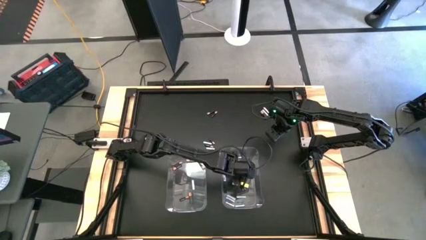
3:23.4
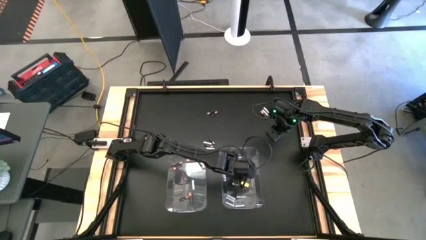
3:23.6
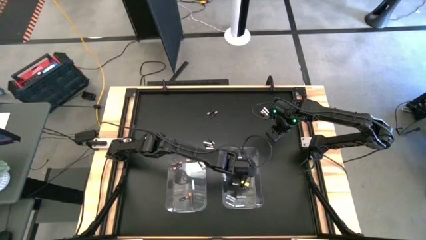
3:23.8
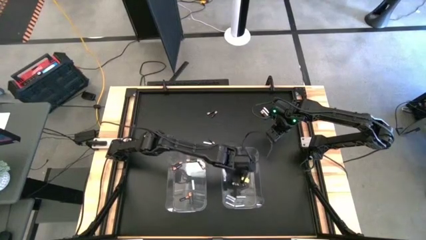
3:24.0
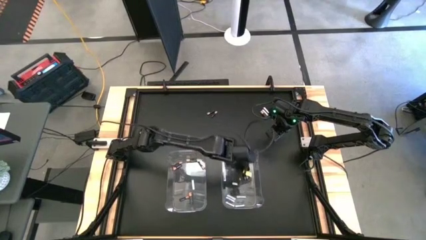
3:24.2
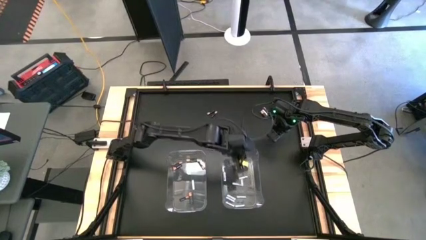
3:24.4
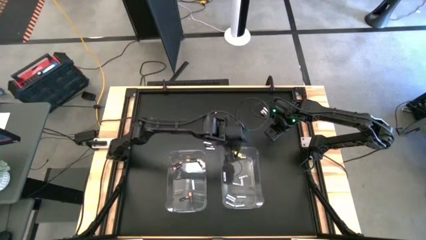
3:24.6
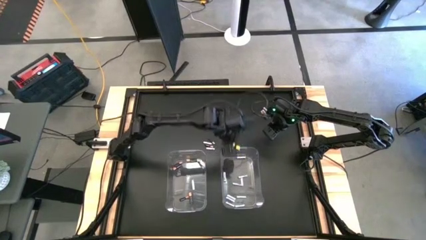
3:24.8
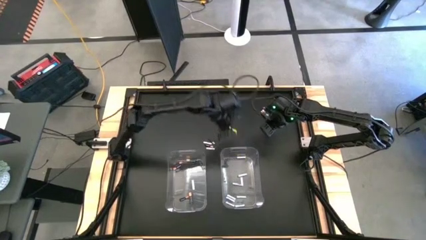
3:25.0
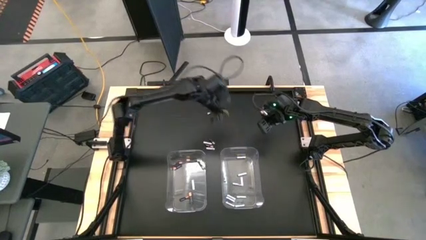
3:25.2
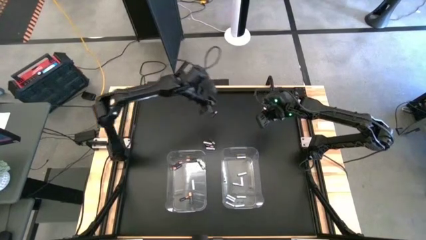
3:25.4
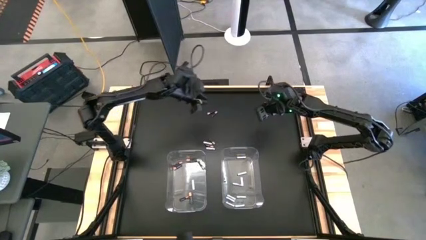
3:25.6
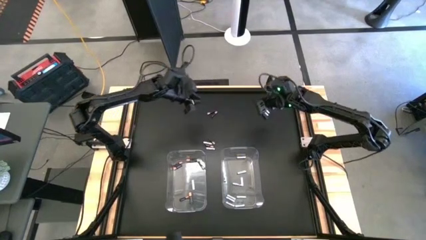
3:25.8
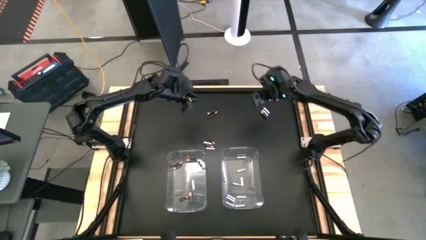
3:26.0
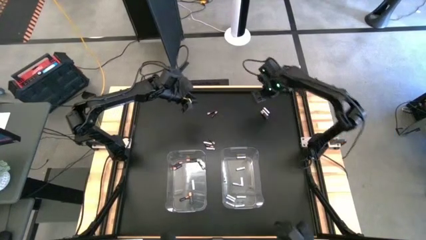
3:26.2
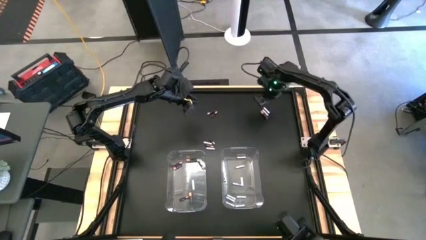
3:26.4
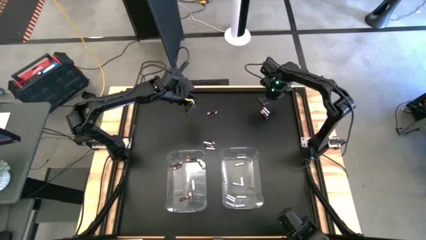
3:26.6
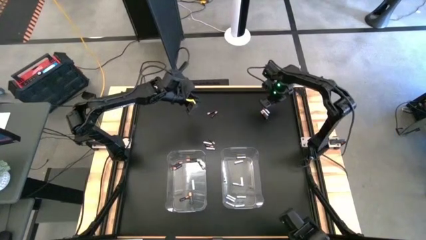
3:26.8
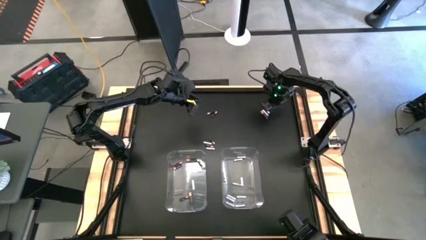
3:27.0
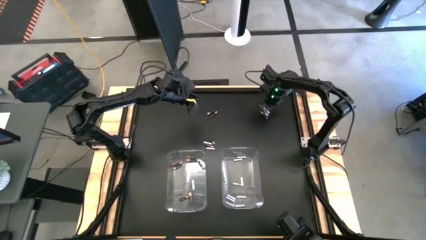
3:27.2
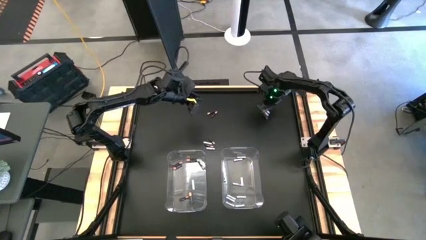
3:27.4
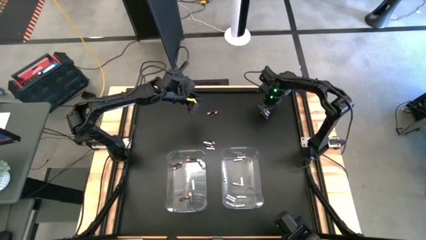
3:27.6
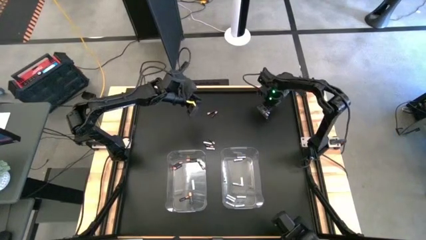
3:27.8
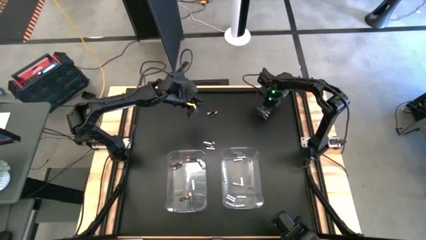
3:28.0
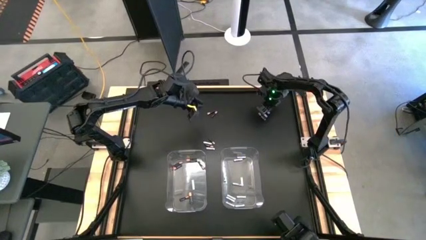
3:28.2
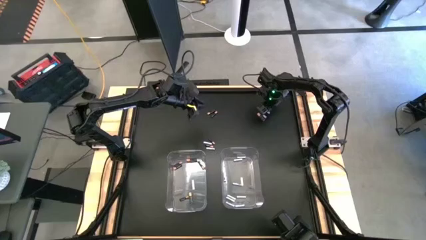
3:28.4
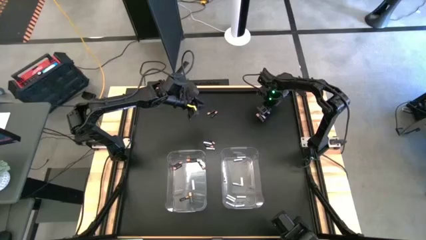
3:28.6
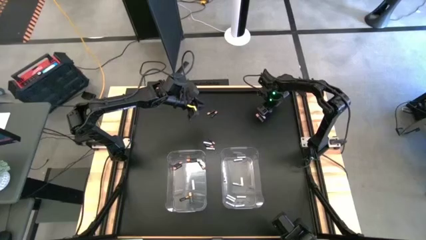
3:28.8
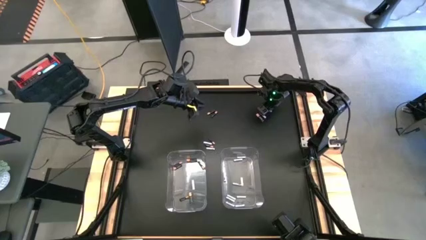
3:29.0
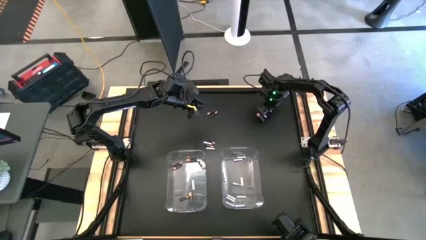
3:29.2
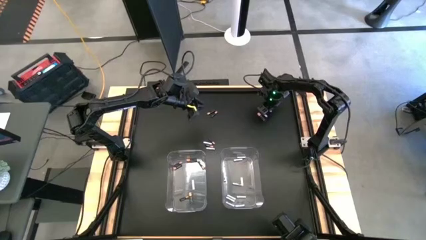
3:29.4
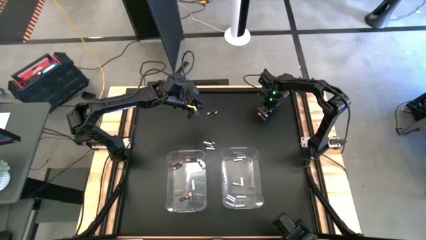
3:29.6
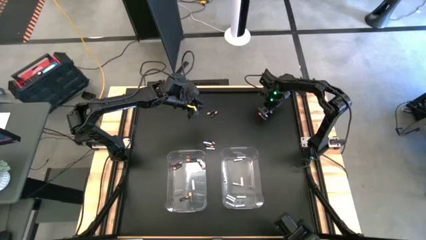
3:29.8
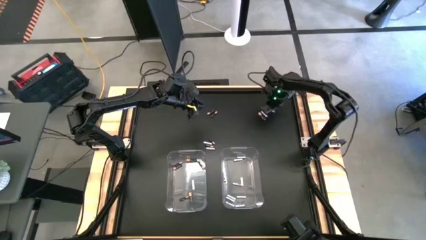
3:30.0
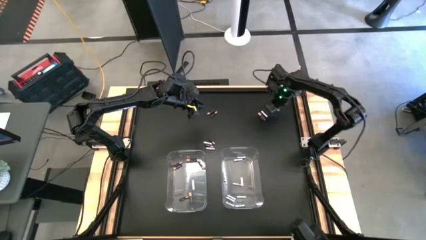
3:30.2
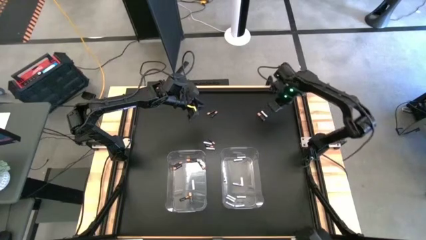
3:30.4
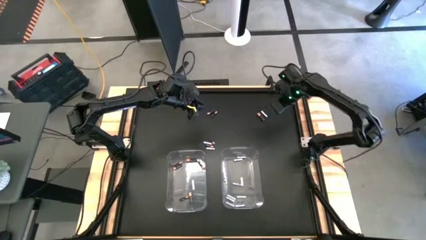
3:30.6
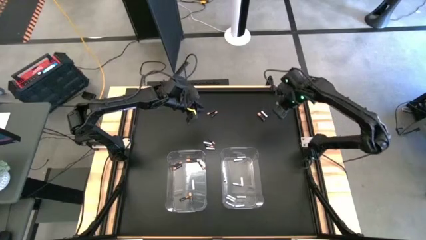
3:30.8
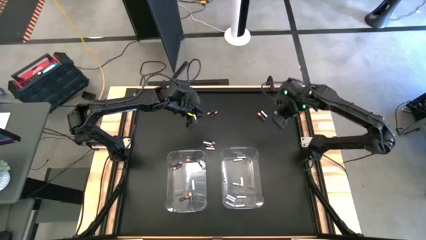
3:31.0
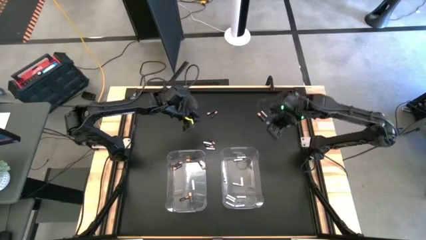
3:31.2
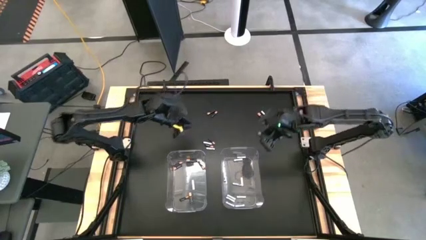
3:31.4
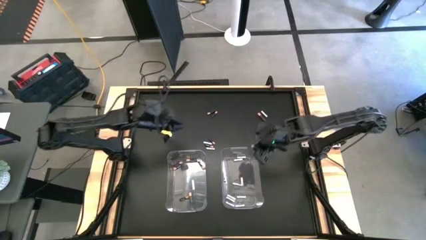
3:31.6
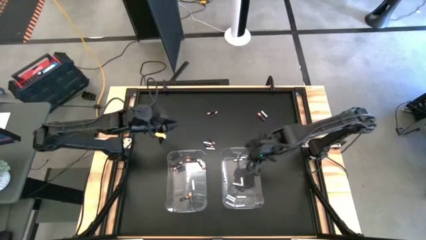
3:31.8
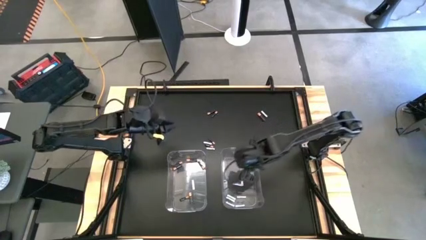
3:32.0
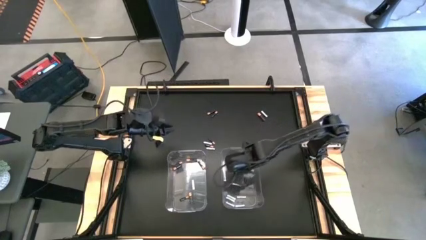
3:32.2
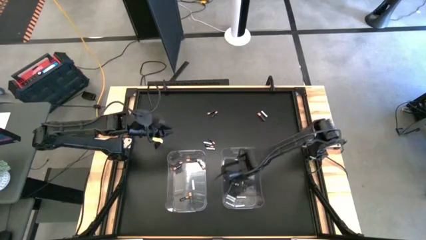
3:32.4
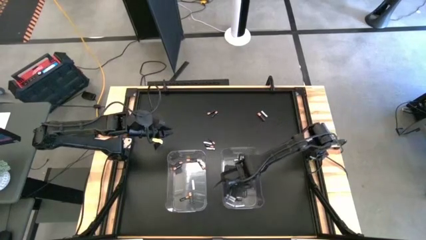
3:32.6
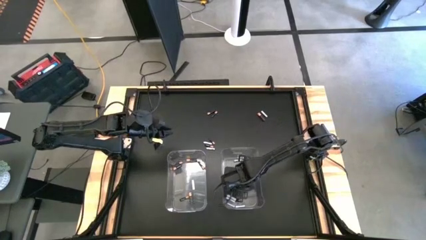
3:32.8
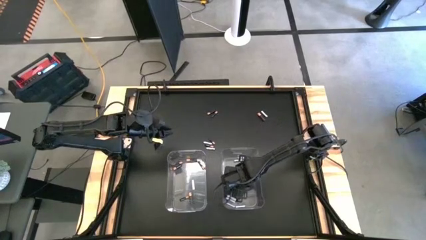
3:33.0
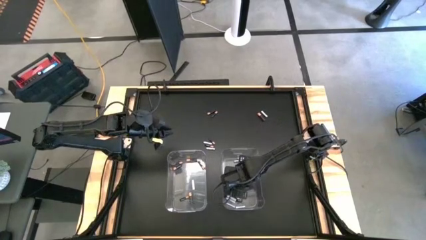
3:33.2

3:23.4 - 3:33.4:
Task: Sort batteries
Put the white battery into the right transparent bin

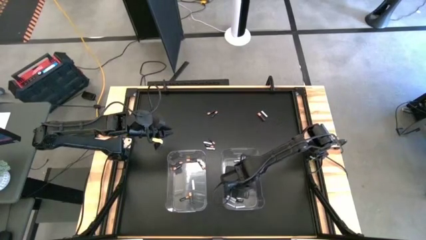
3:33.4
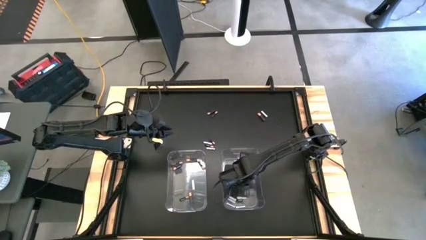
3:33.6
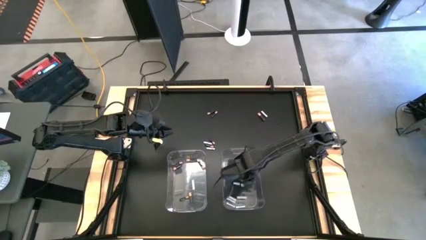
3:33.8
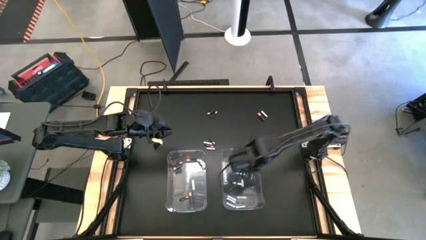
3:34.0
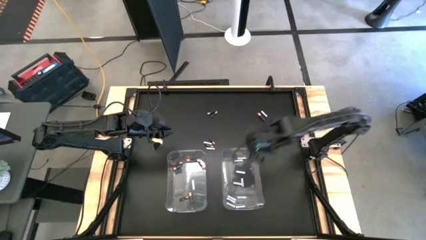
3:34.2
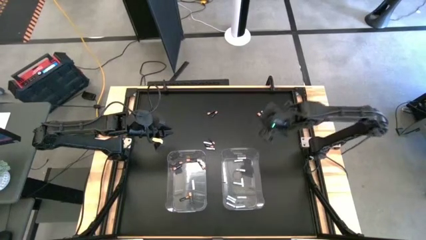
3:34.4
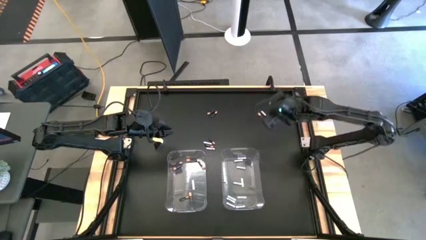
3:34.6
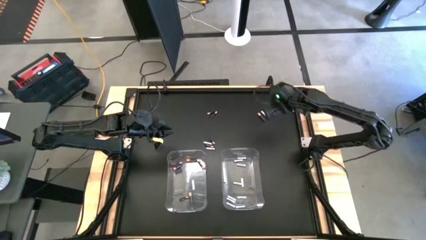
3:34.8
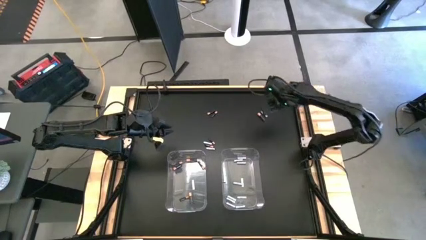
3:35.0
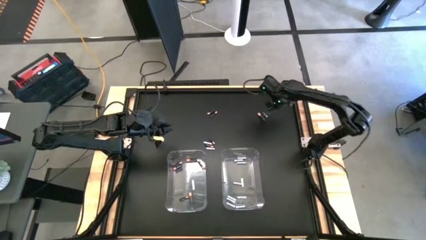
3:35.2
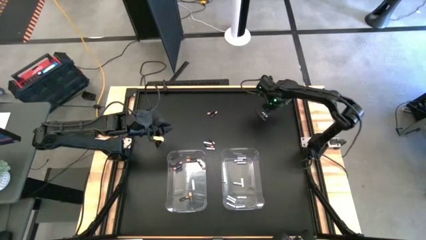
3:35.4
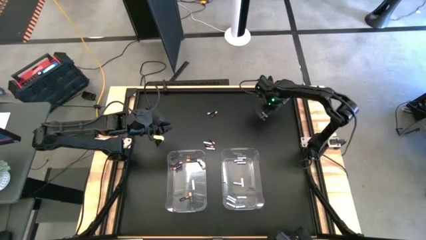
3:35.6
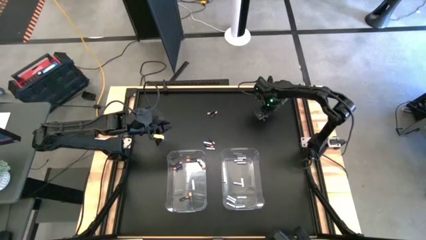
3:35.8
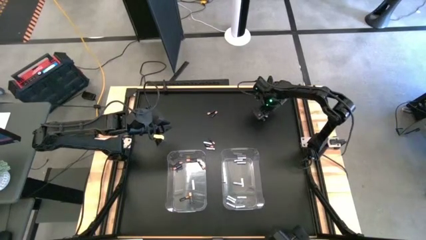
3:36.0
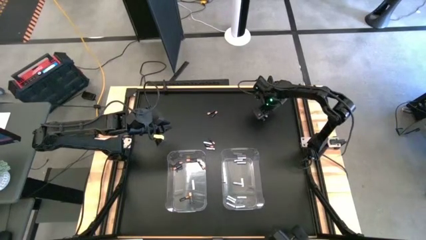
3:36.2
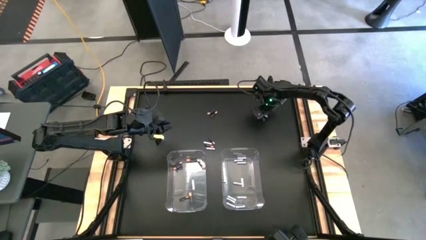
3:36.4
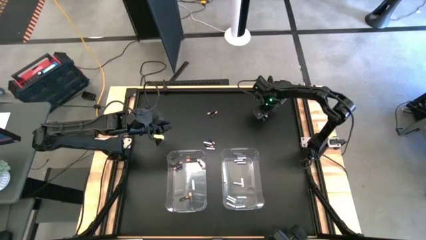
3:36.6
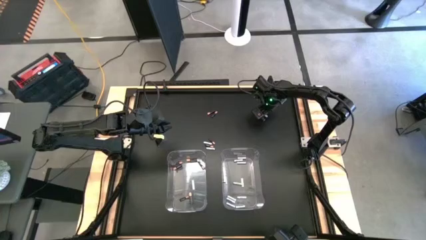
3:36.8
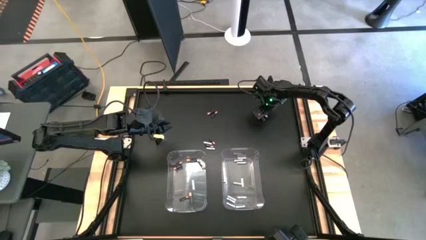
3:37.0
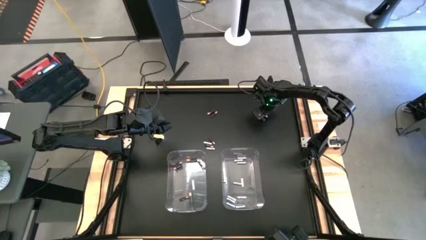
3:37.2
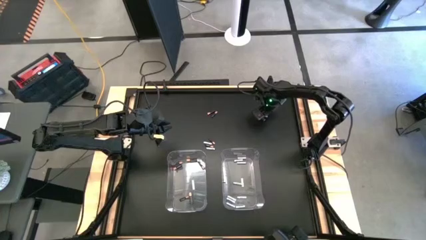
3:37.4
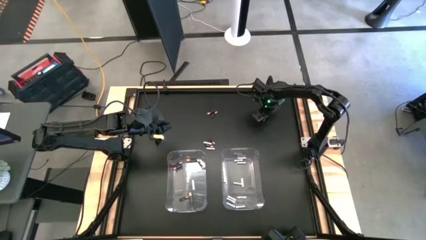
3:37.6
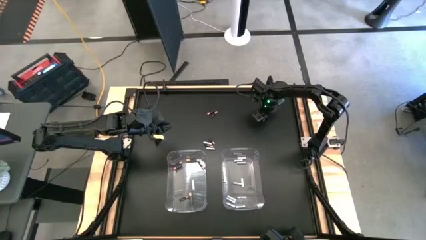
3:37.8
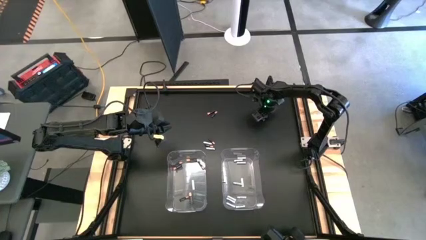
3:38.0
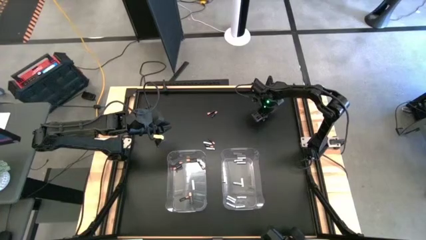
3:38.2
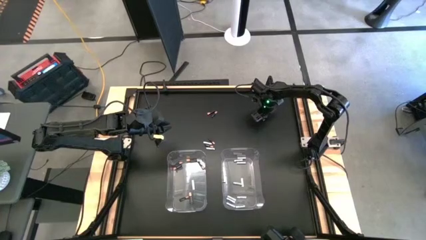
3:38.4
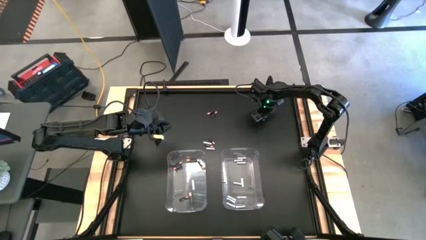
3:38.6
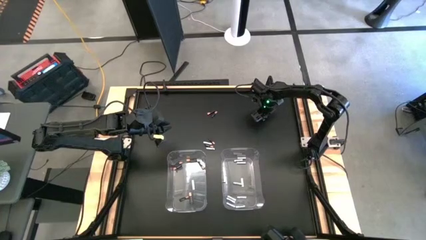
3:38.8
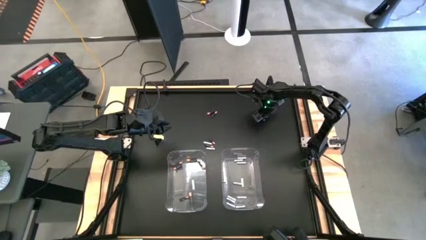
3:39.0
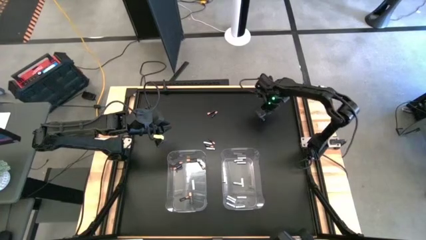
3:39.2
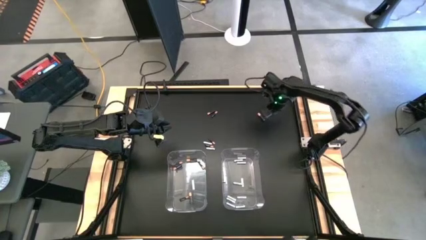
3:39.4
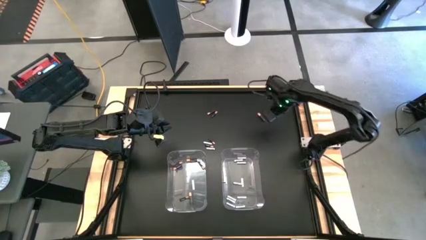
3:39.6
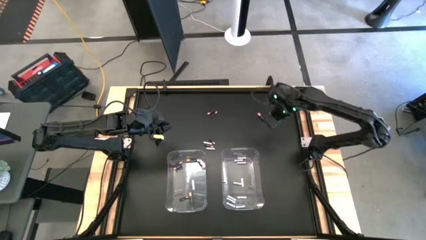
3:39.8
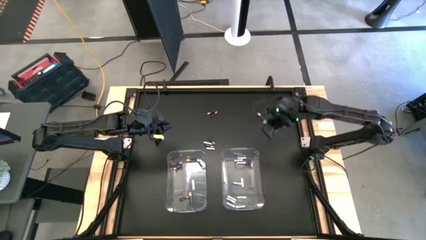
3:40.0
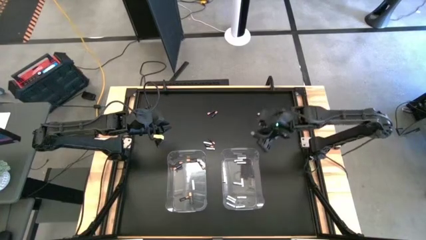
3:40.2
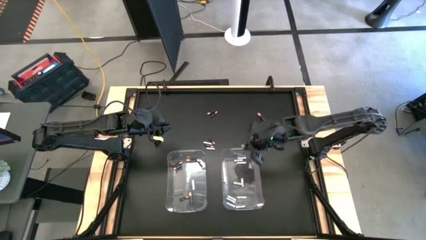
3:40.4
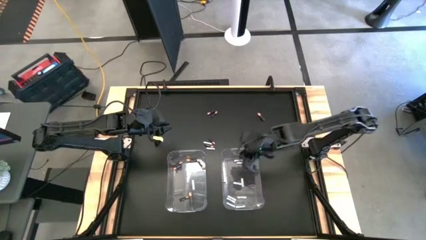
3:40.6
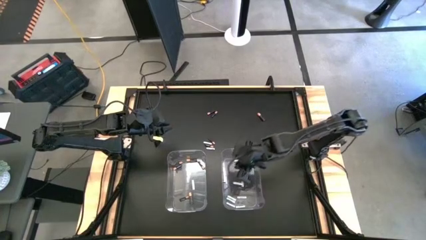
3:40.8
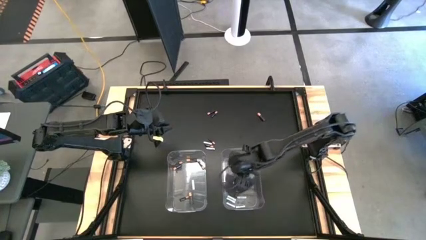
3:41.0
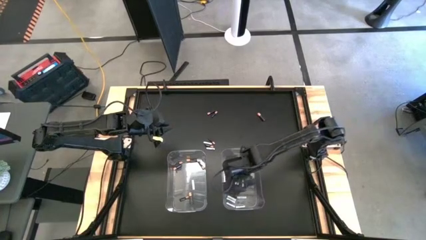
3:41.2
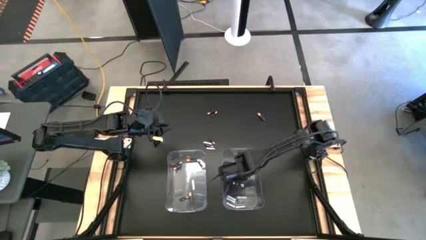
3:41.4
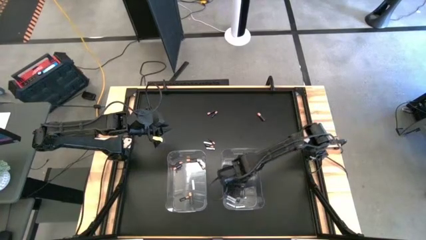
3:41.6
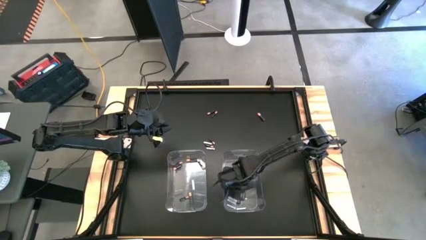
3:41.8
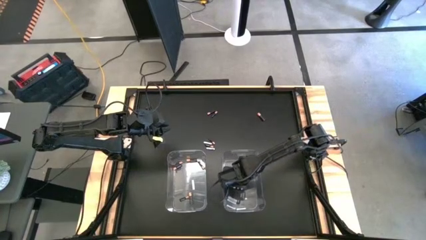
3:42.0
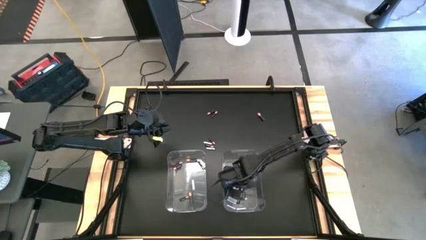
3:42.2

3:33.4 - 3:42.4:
Put the white battery into the right transparent bin
